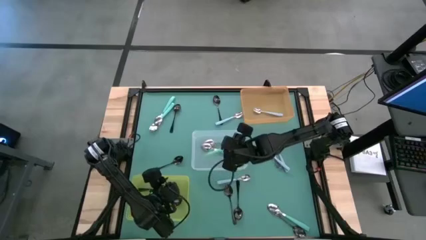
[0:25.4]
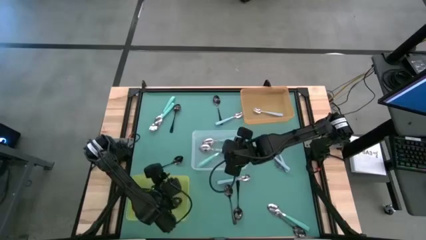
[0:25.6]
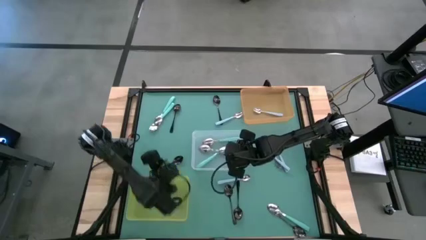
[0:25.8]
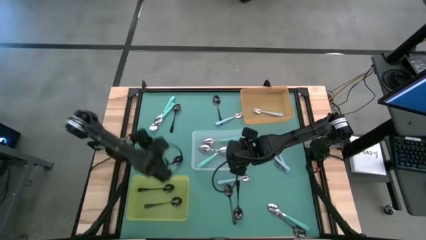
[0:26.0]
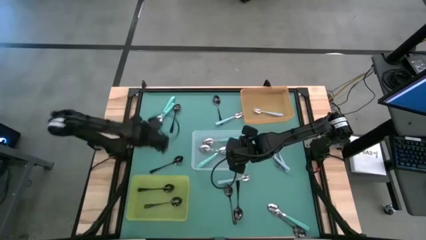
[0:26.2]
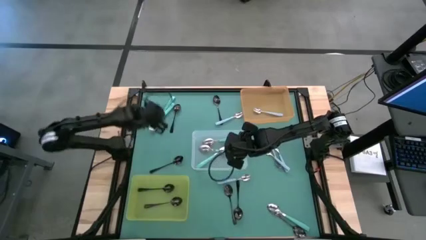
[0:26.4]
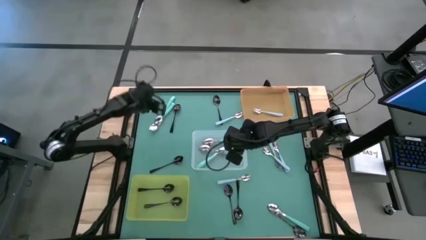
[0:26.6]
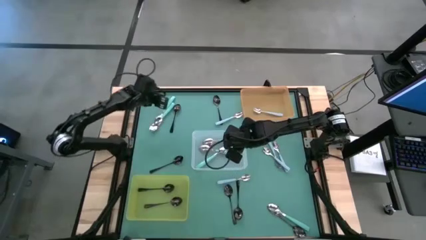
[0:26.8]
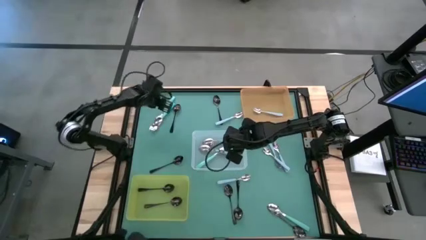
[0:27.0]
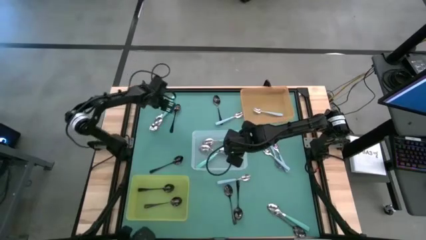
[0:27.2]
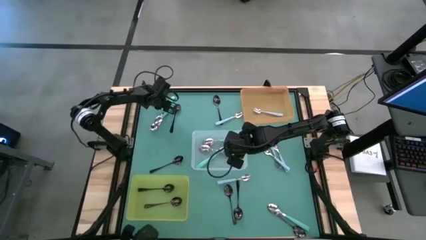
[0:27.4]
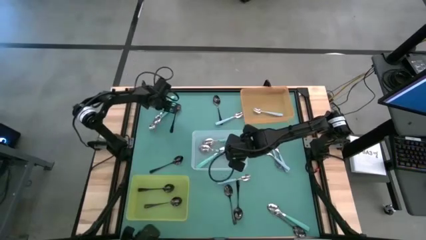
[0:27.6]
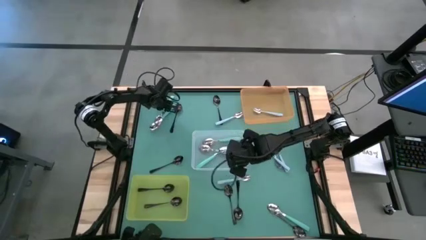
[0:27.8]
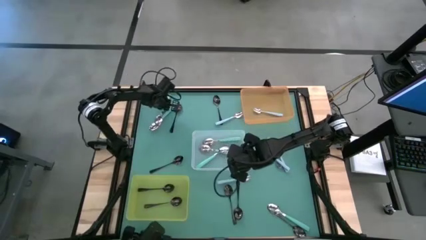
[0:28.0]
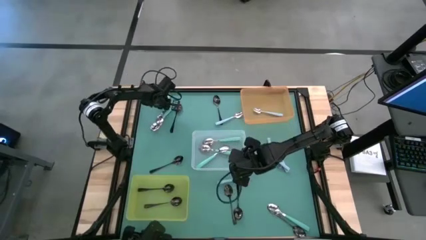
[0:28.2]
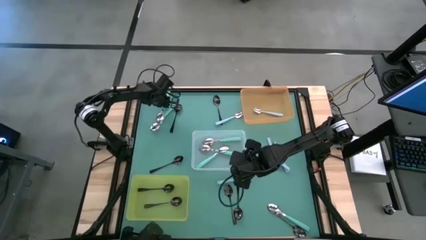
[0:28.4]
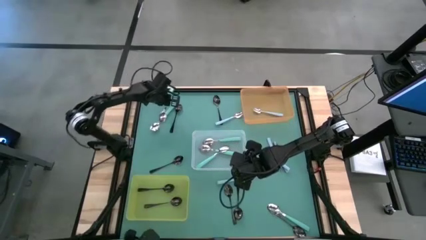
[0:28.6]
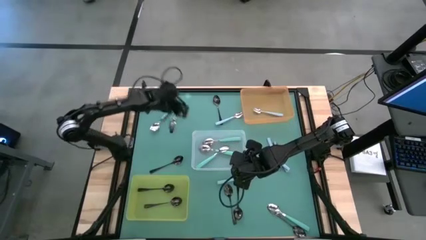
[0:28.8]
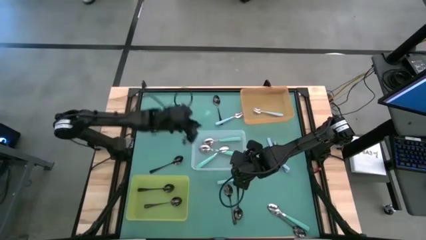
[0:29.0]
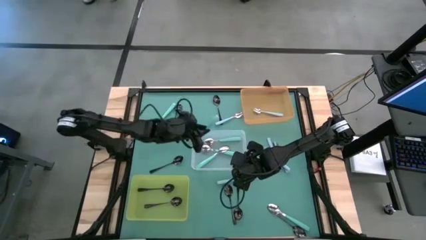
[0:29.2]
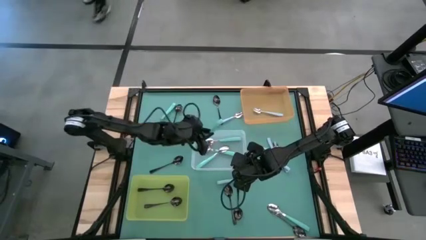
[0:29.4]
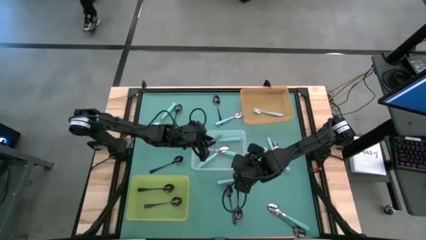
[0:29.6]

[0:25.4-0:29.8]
Task: Sort silverware by color (type)
Put the green spoon into the transparent bin

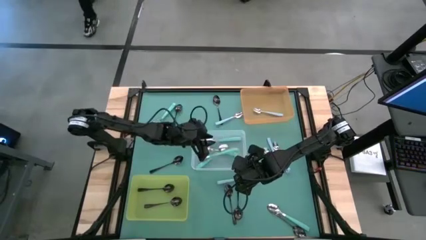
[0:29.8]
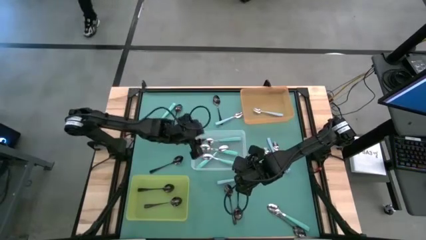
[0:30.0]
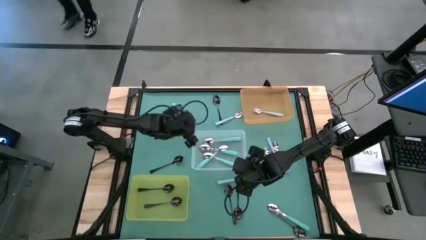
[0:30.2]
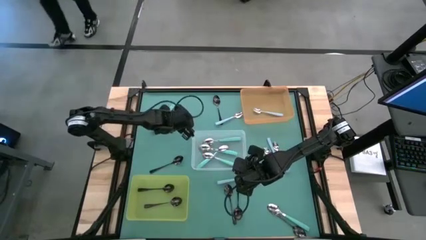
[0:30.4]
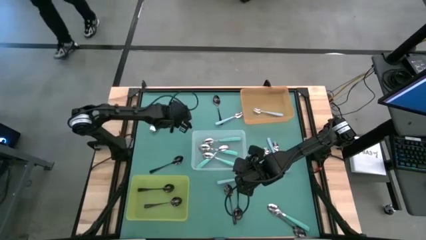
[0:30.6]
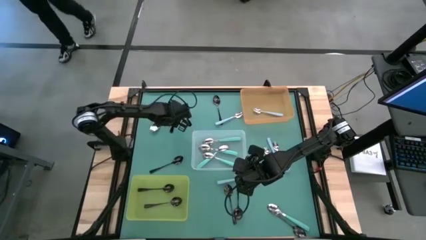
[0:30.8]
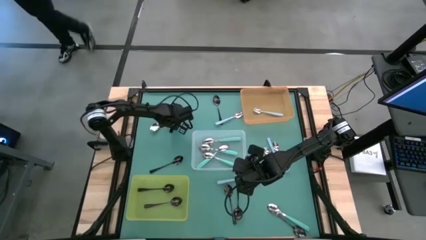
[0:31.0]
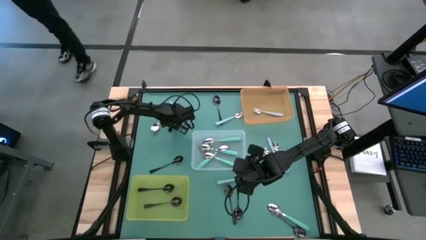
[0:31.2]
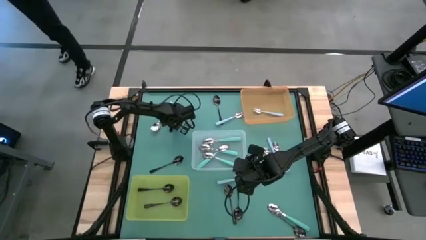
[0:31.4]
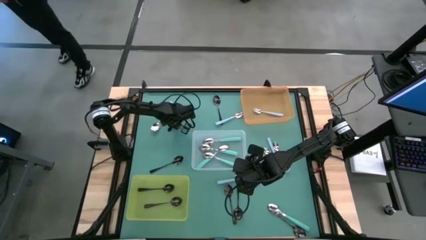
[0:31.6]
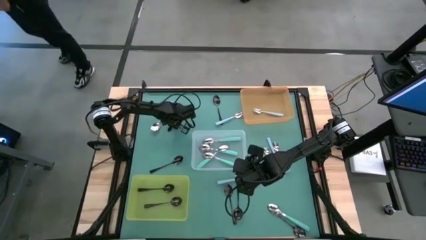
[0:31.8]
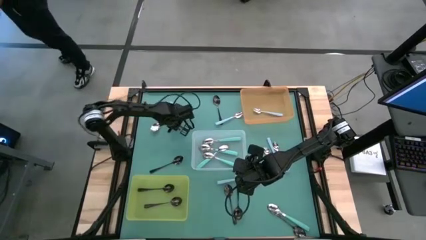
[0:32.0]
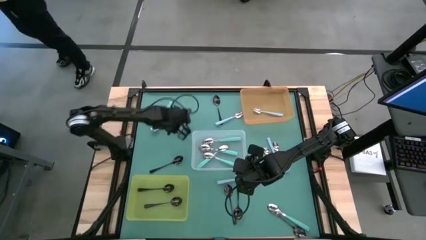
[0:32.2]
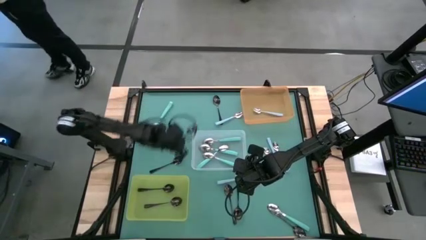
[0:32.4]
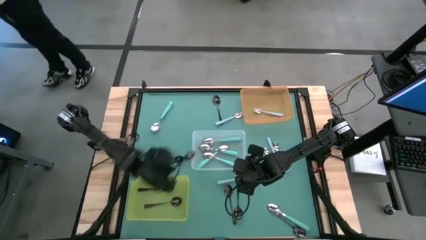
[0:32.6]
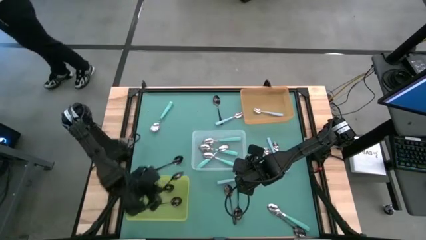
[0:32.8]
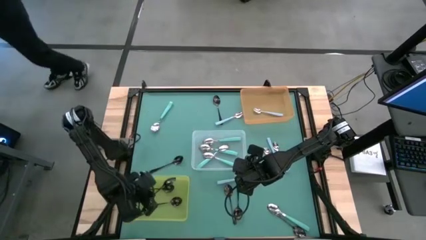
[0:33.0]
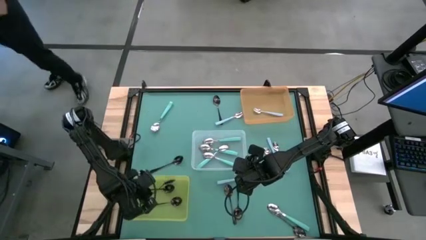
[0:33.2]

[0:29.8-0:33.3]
Put the black spoon into the yellow bin

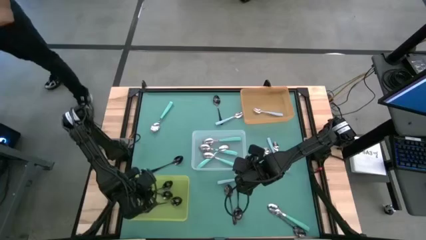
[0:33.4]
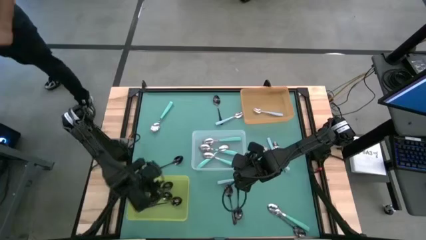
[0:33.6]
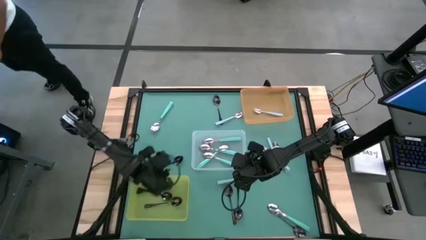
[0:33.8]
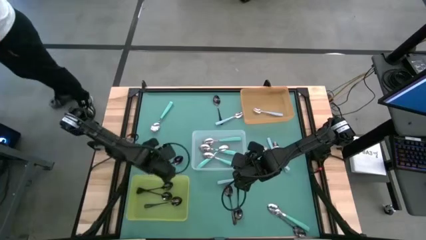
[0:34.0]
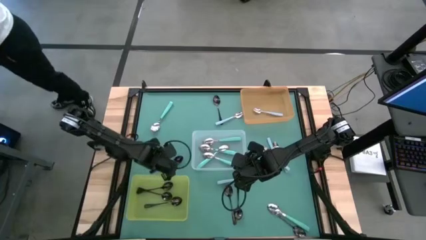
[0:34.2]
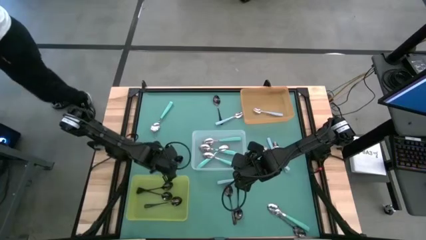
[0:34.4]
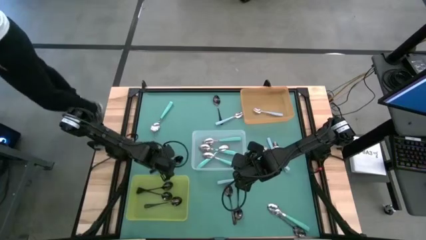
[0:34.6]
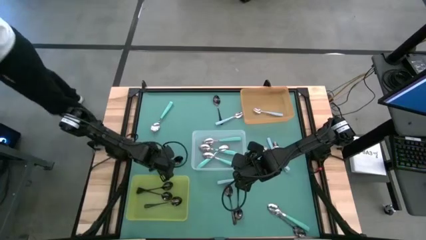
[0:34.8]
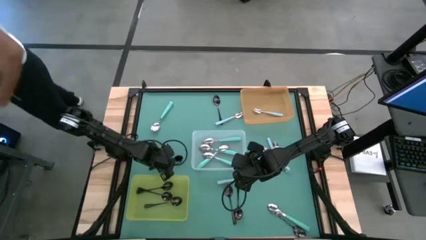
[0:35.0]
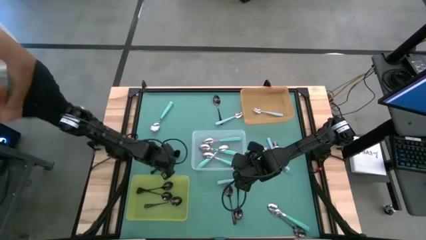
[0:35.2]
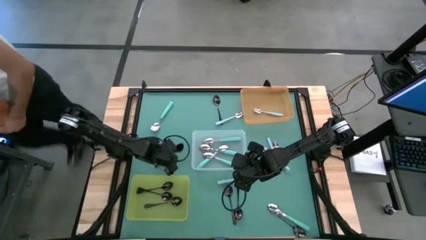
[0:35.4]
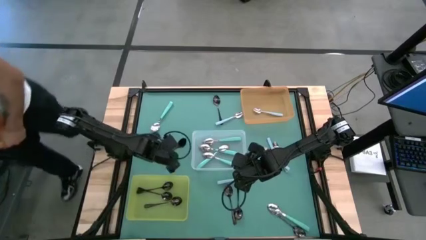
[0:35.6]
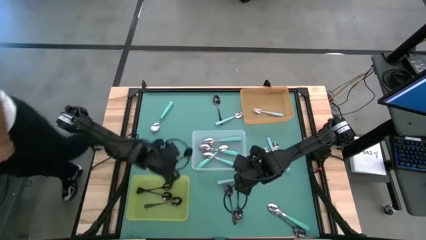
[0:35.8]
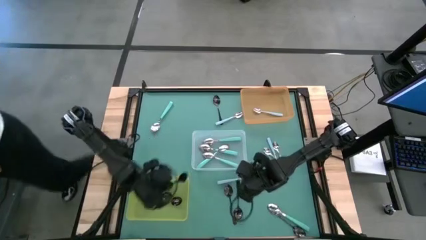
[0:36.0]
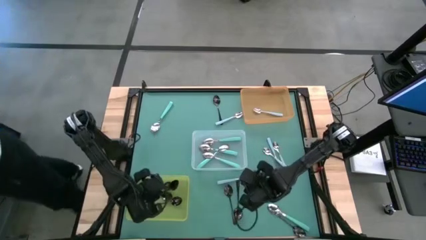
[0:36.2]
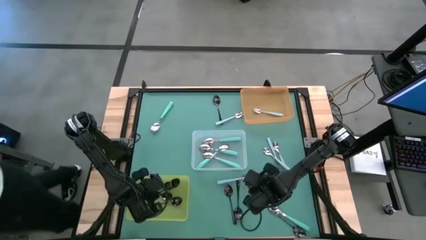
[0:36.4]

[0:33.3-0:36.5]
Put the black spoon into the yellow bin

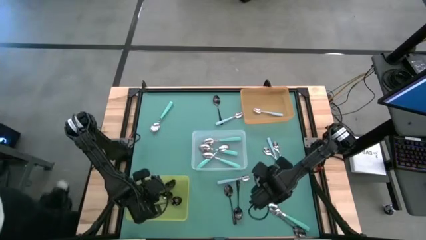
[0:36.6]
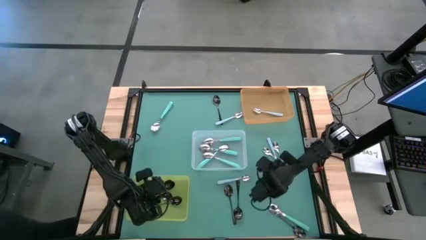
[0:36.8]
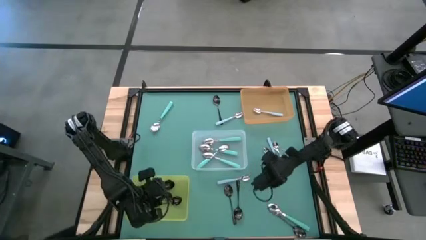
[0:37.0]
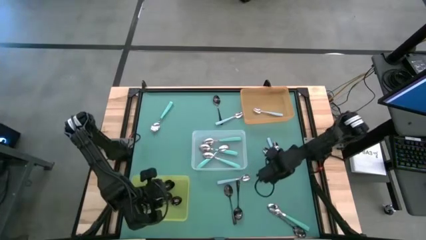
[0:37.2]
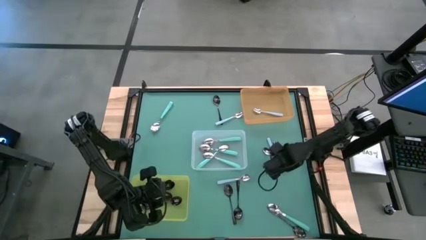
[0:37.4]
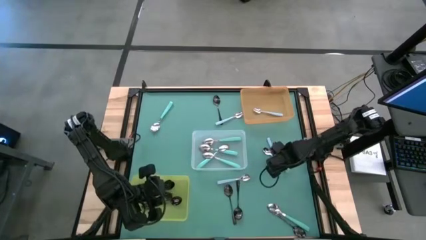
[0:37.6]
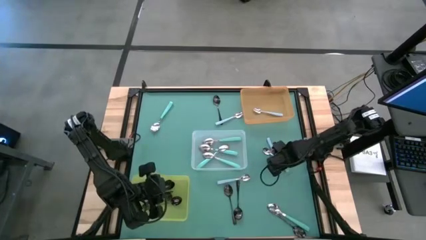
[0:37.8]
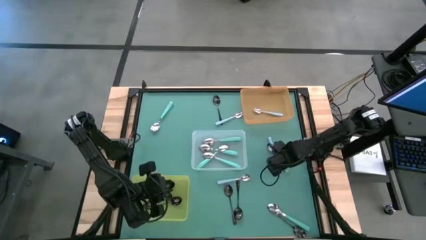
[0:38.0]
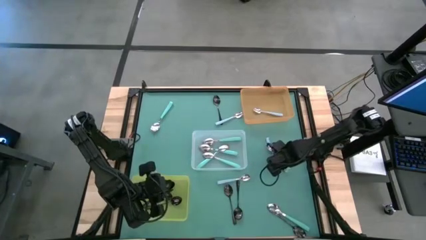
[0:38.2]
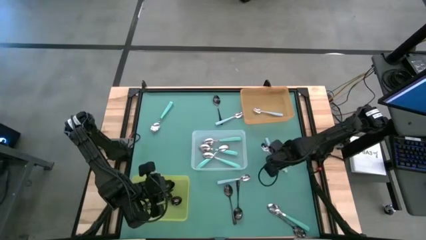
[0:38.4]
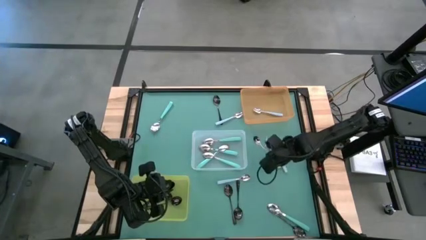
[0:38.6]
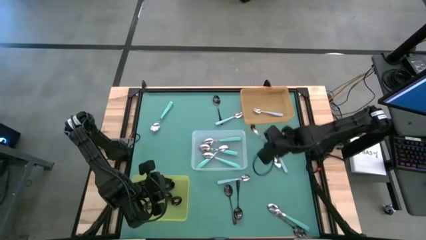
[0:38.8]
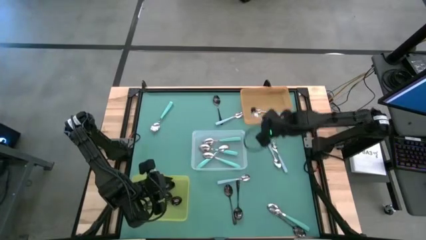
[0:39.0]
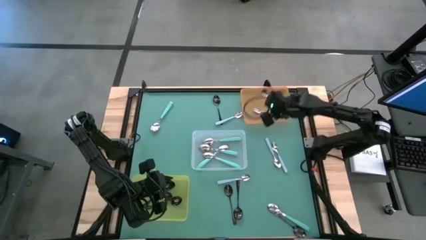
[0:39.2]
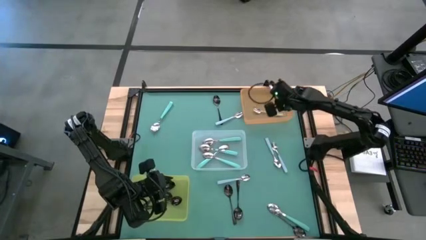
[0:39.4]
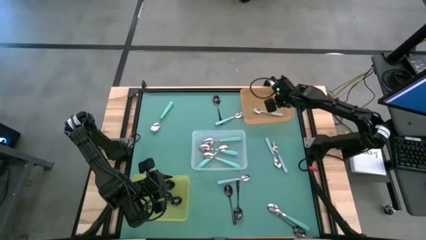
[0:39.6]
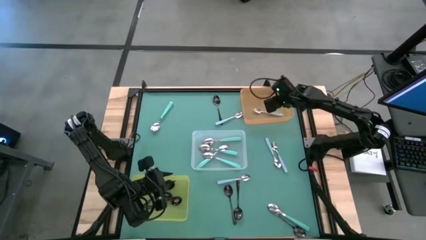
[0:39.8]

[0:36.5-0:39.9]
Put the purple spoon into the orange bin

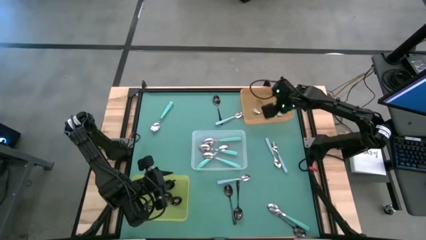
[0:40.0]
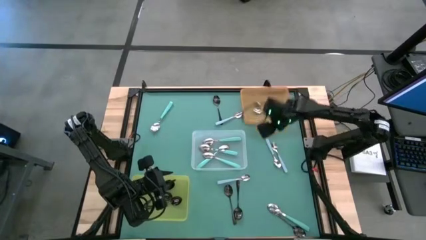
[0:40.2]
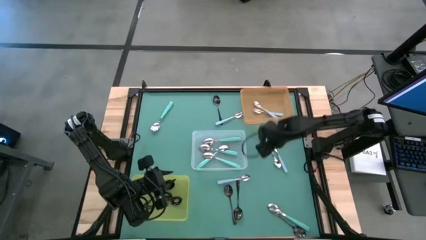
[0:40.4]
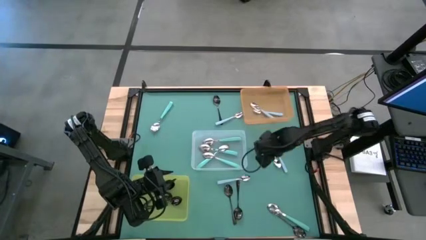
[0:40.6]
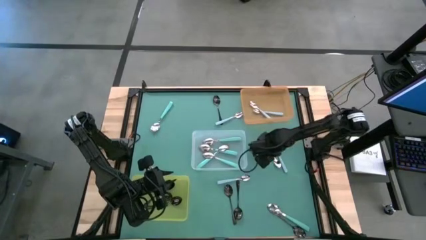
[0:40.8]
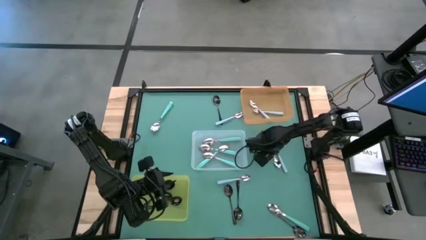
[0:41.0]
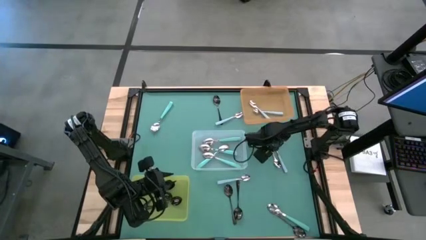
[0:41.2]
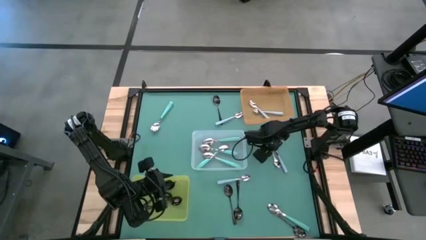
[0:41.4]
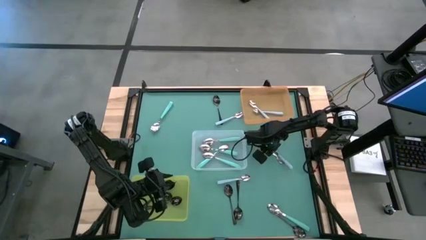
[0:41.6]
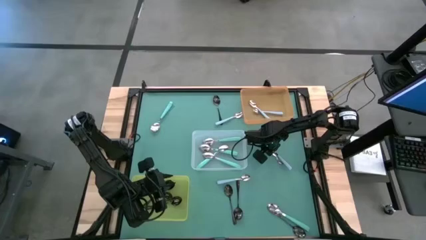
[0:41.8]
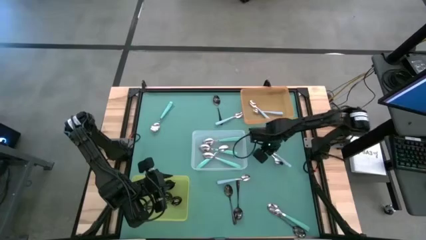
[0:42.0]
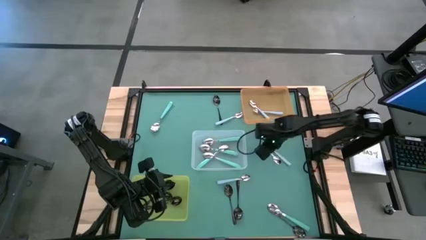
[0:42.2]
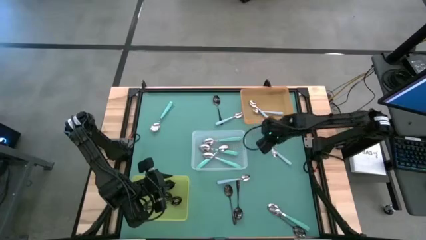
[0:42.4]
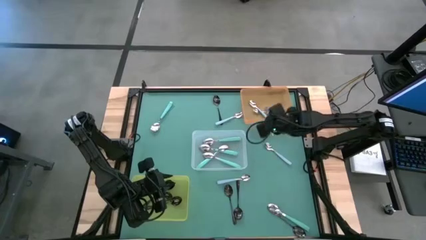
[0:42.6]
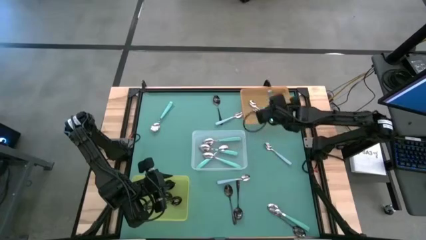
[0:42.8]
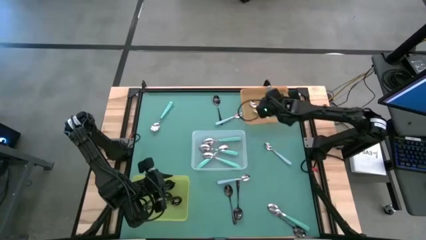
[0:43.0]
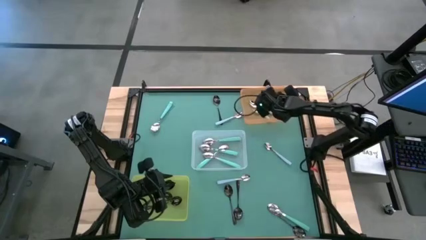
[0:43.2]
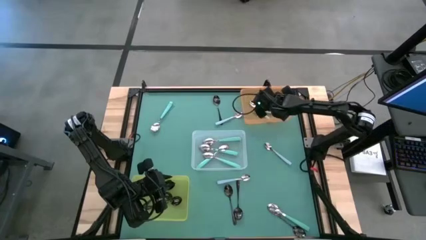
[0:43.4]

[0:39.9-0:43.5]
Put the purple spoon into the orange bin
